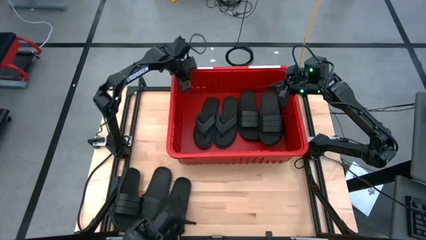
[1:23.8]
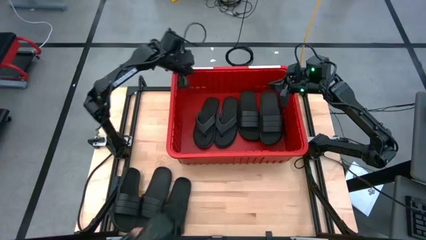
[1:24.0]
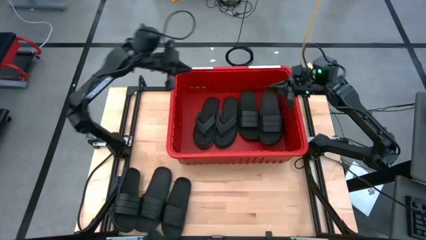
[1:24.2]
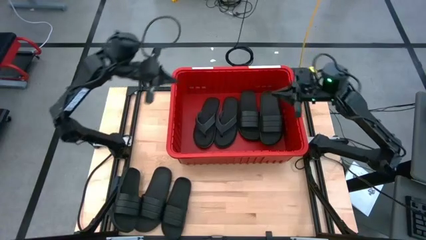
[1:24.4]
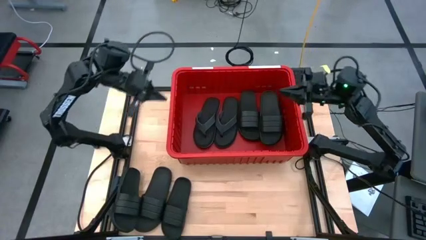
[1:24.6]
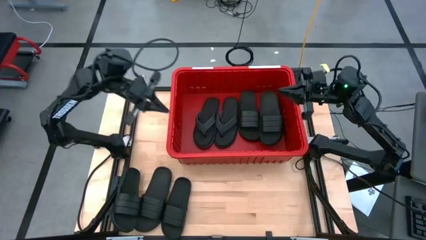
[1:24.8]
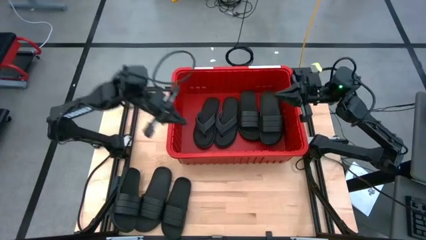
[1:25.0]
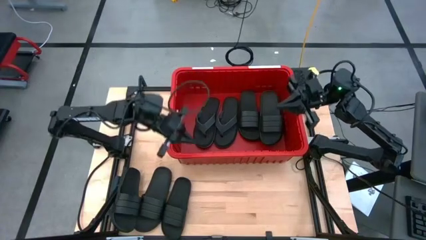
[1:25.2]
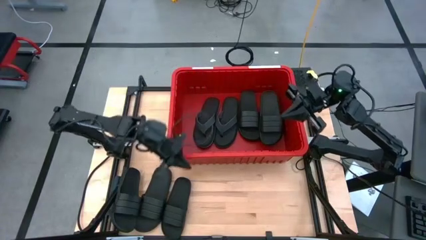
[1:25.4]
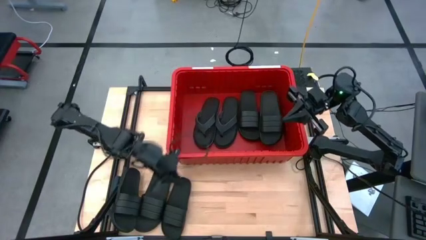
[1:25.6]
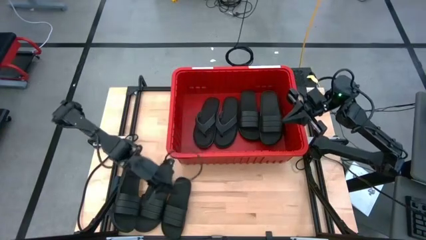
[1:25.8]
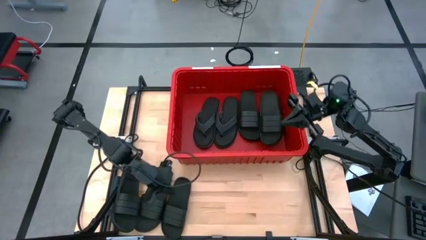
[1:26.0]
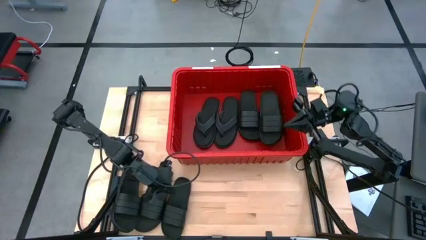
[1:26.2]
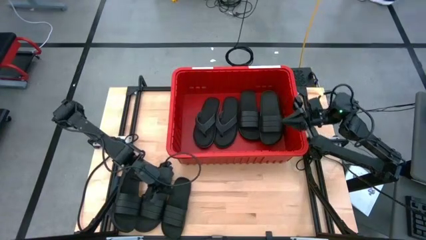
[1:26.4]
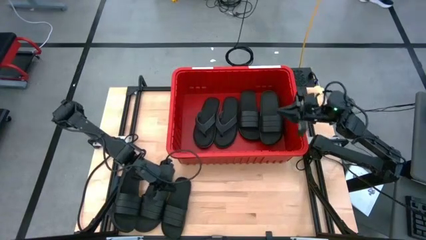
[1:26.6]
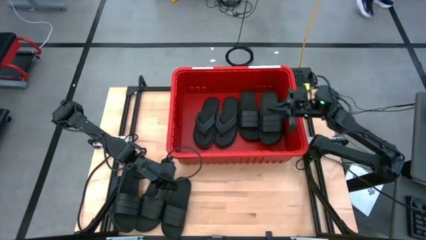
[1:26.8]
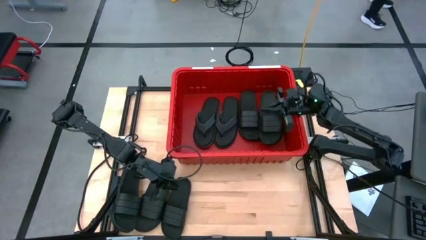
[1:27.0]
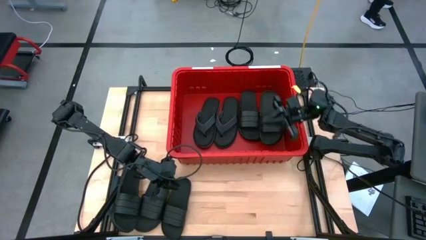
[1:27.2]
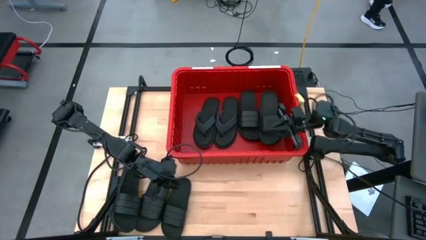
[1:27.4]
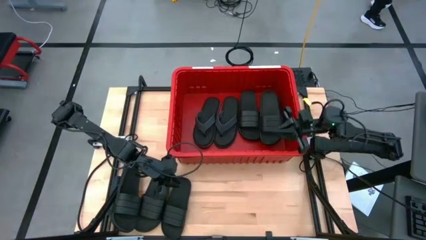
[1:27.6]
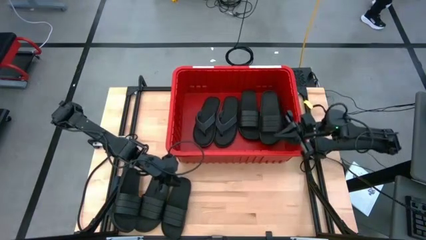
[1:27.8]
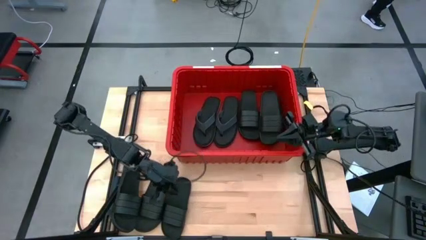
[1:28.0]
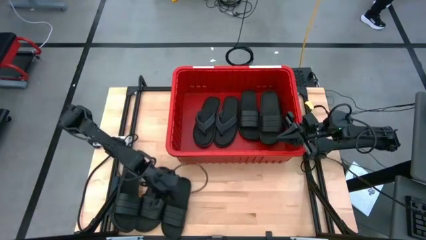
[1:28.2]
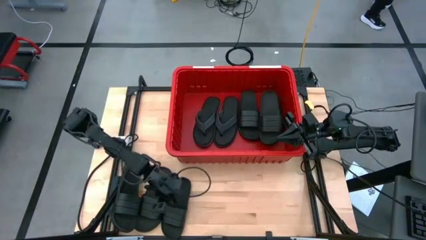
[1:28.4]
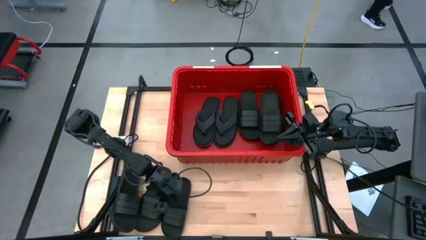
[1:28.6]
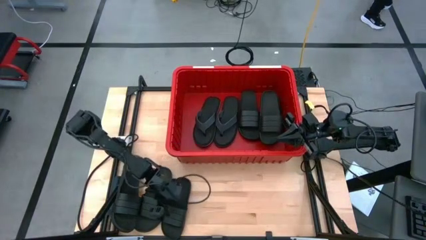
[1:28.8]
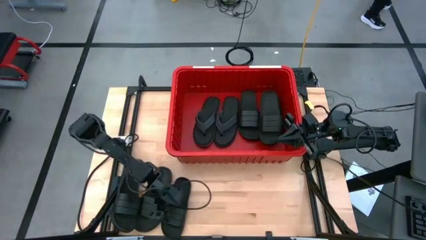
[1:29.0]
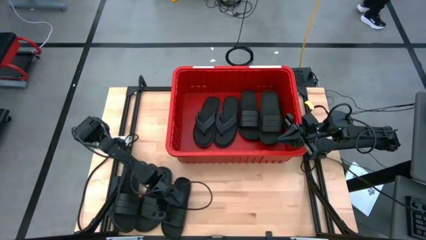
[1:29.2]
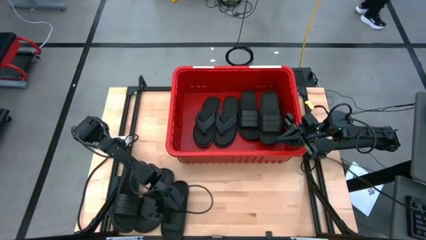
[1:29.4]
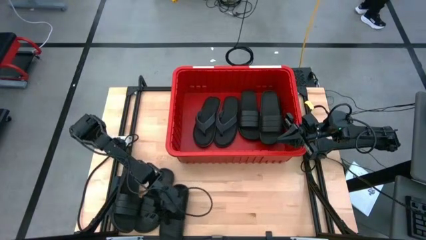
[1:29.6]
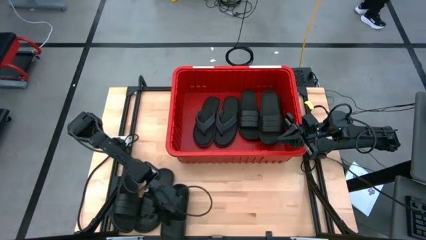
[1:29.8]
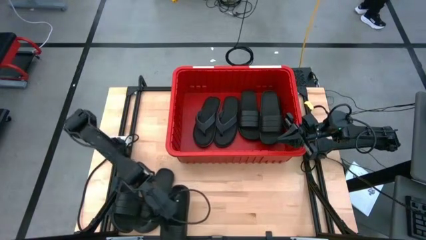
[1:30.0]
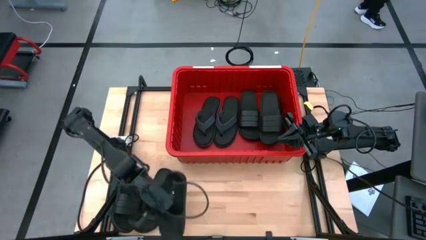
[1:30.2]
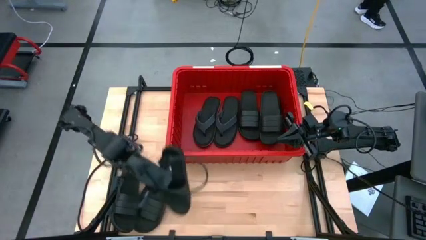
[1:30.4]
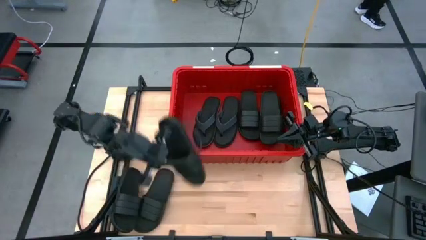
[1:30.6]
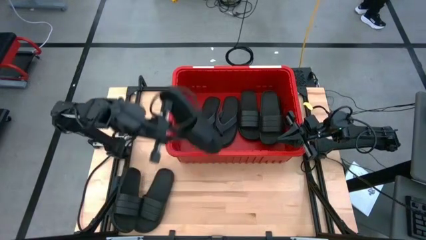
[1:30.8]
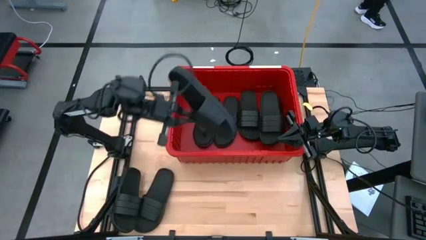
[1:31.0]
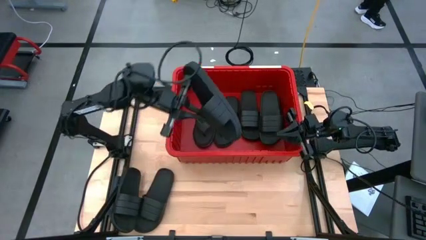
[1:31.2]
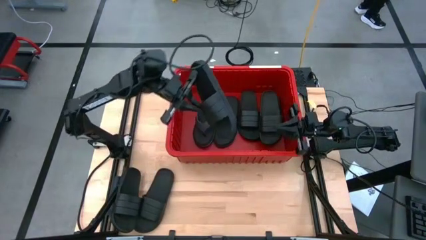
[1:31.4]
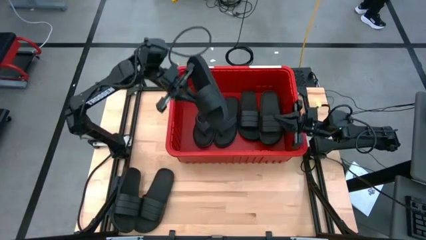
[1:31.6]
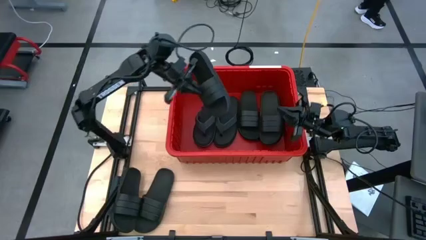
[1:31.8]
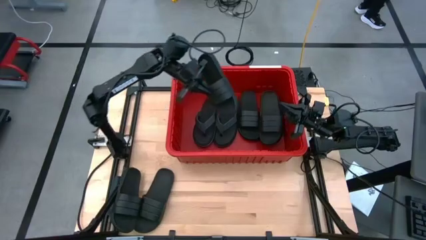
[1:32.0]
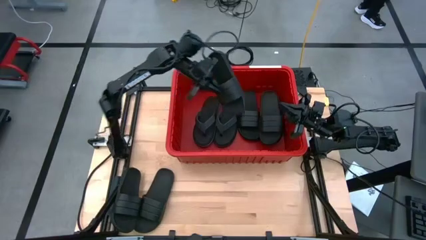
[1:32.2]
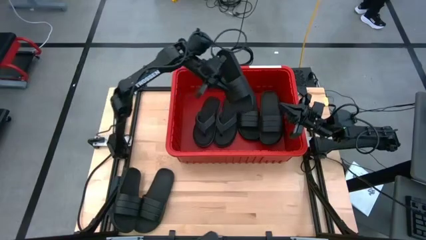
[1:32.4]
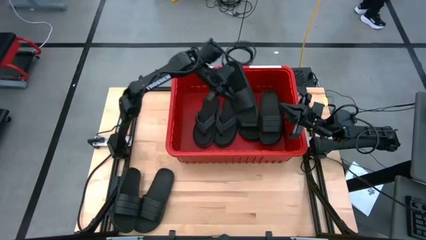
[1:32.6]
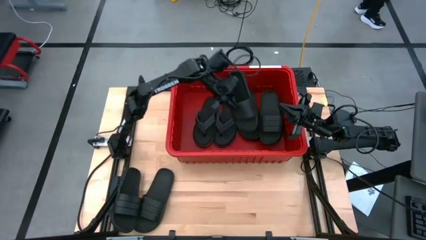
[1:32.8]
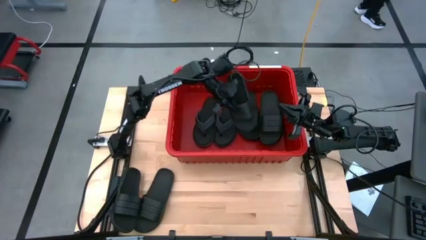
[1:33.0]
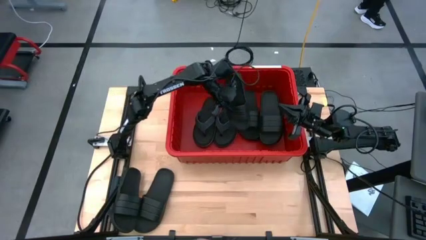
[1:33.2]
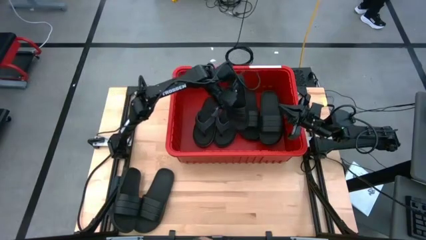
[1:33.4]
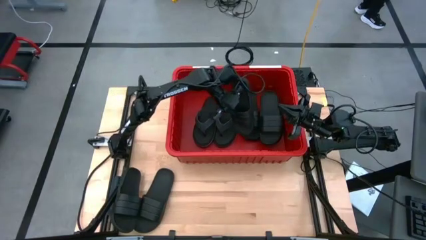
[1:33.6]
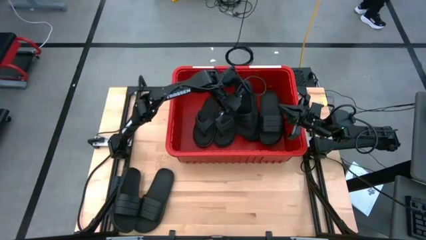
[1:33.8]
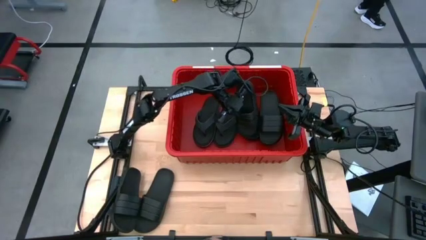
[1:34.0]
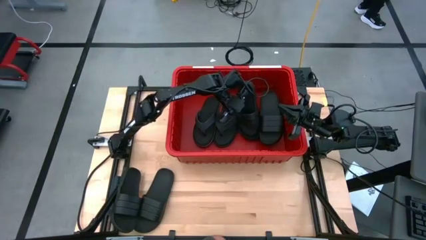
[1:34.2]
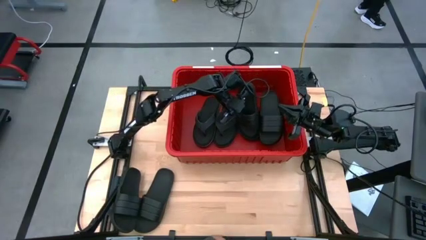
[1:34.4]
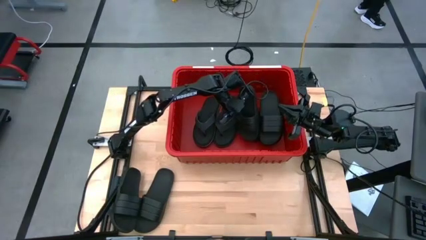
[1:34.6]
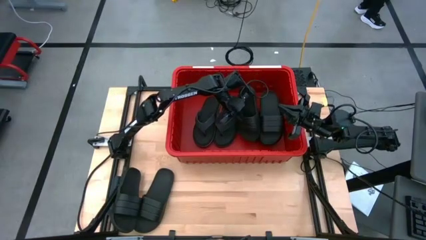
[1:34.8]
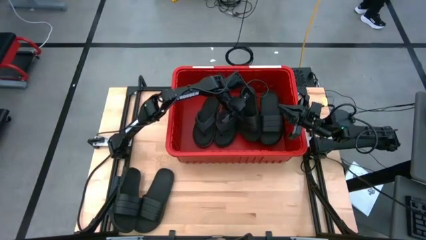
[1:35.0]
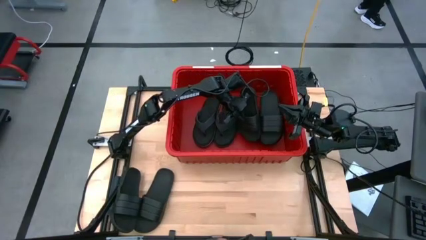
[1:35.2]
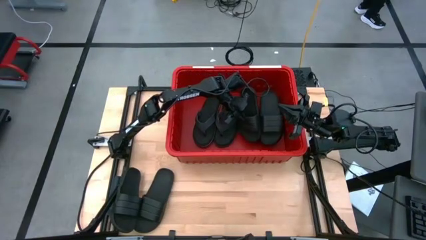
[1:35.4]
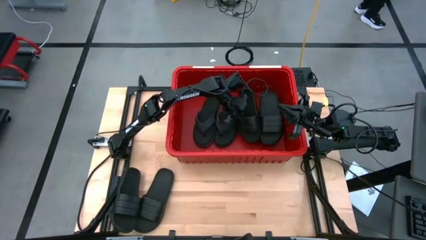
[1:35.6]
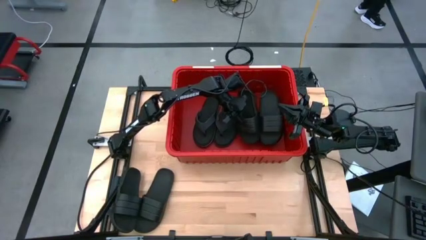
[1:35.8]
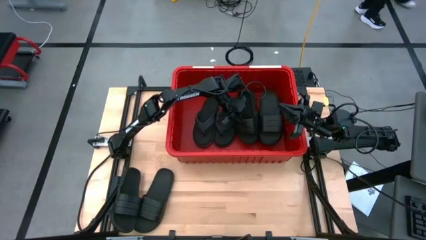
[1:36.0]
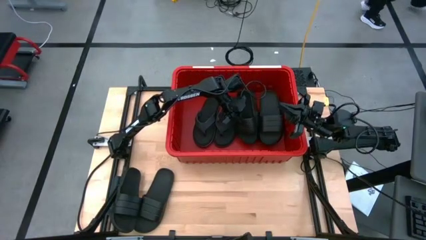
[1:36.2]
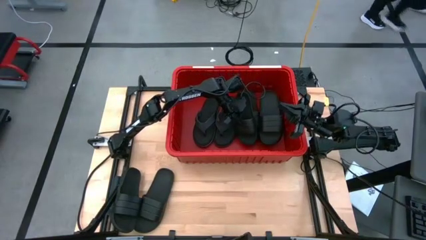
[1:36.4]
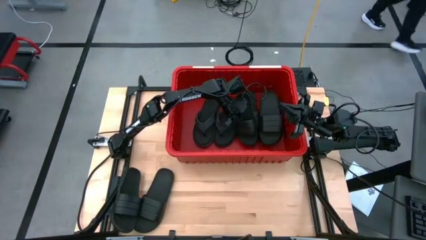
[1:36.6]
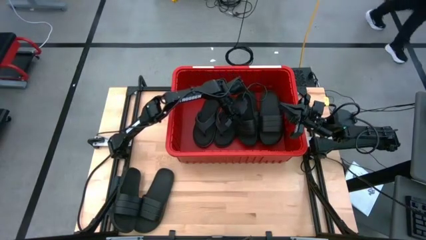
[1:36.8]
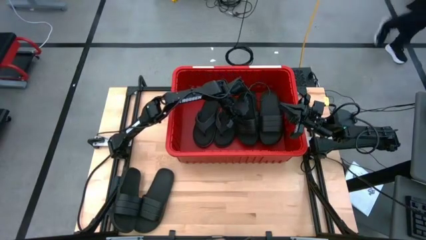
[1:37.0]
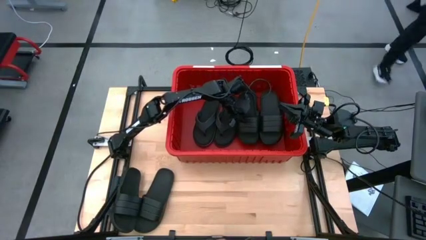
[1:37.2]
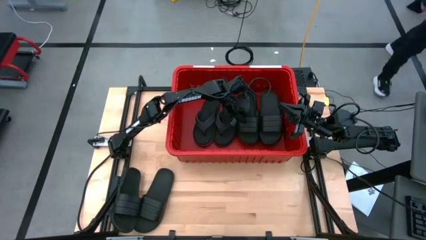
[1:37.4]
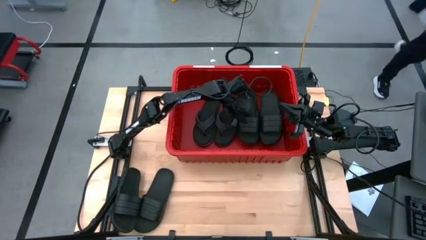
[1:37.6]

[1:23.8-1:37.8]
Task: Pick and place slides into bin
Put the black slide into the red container
